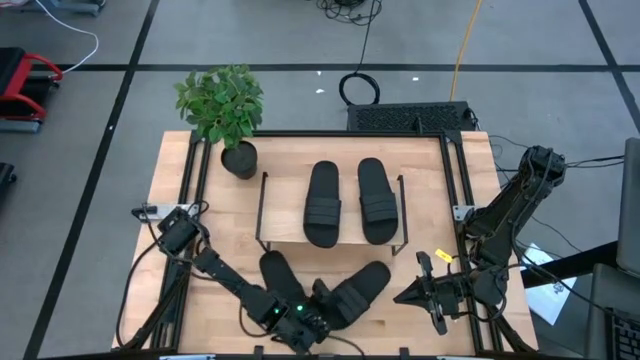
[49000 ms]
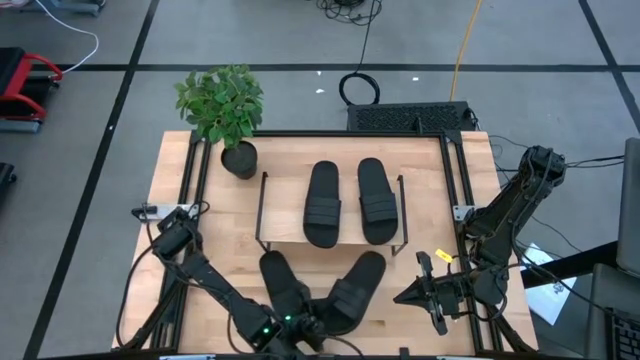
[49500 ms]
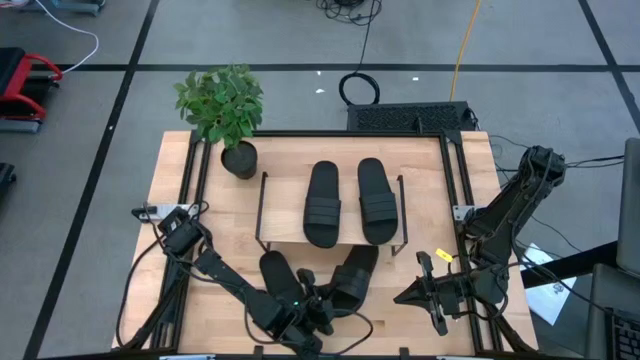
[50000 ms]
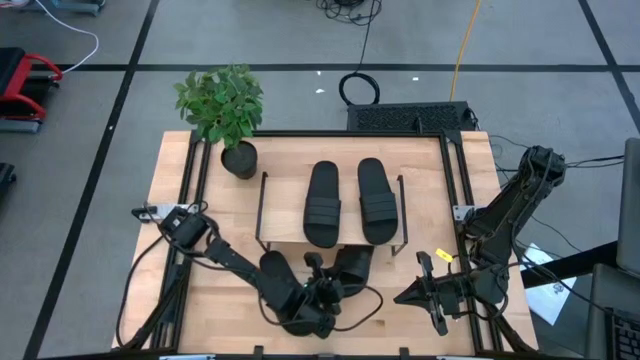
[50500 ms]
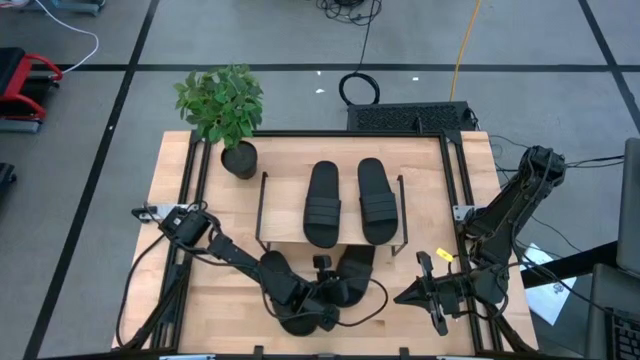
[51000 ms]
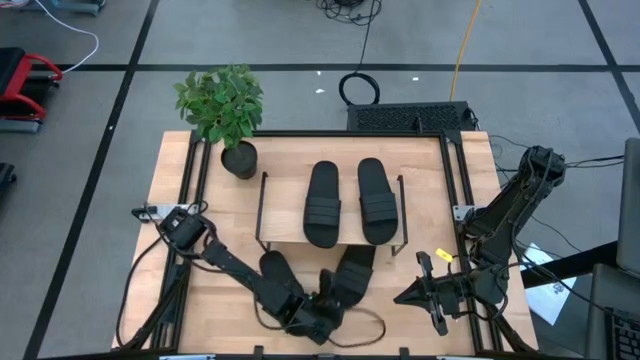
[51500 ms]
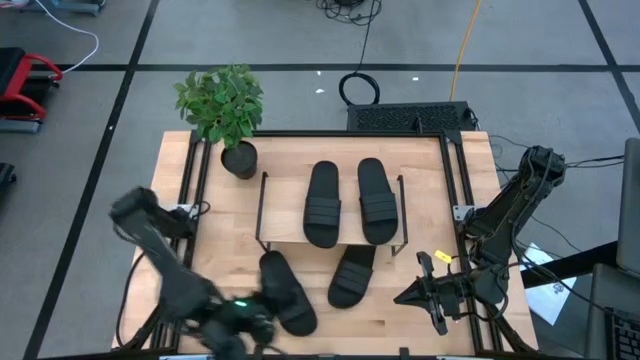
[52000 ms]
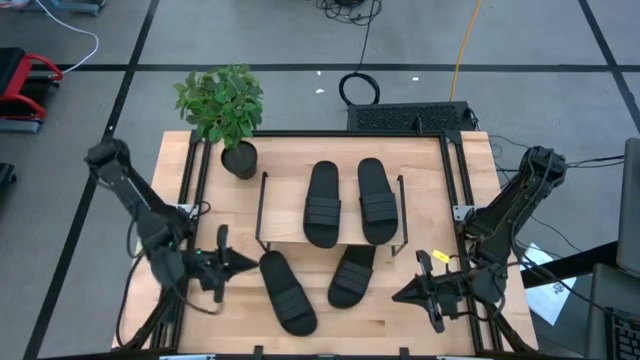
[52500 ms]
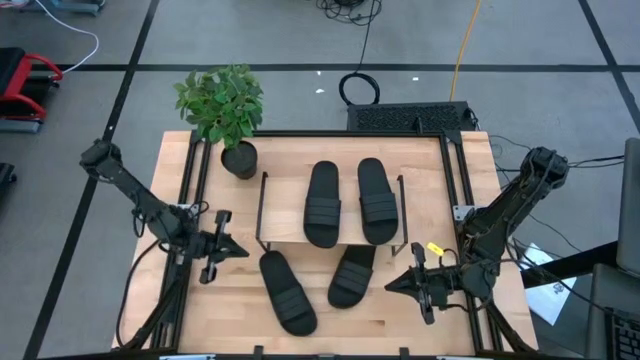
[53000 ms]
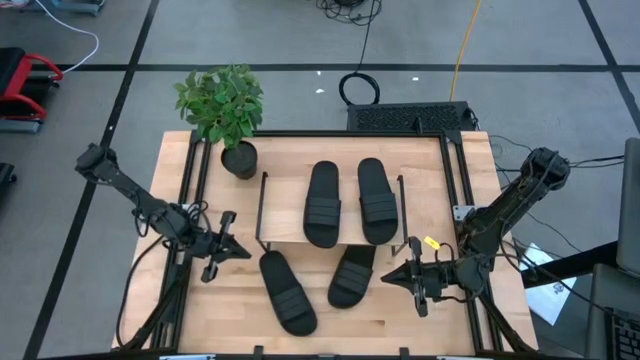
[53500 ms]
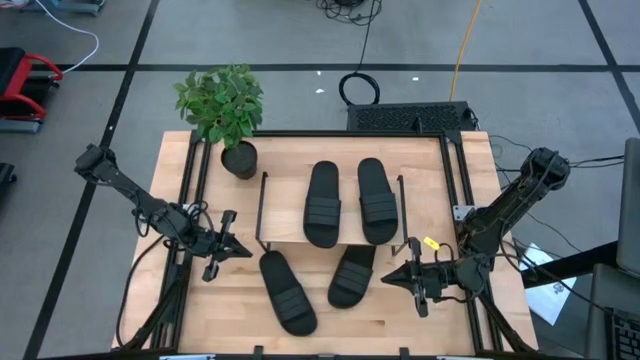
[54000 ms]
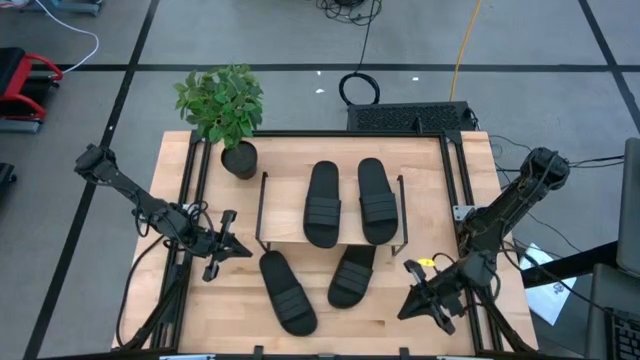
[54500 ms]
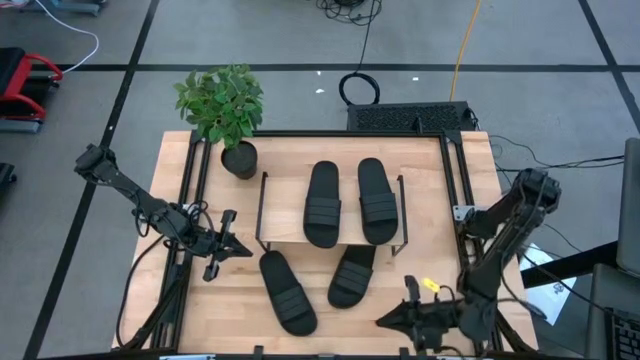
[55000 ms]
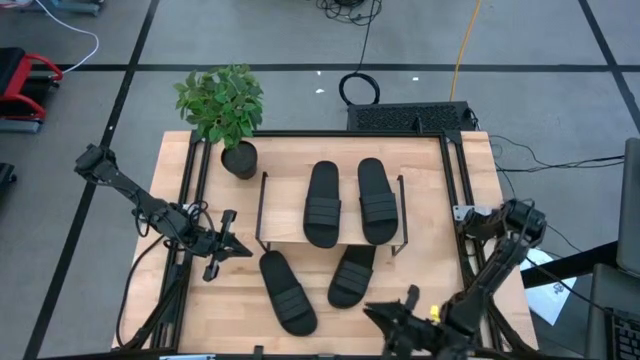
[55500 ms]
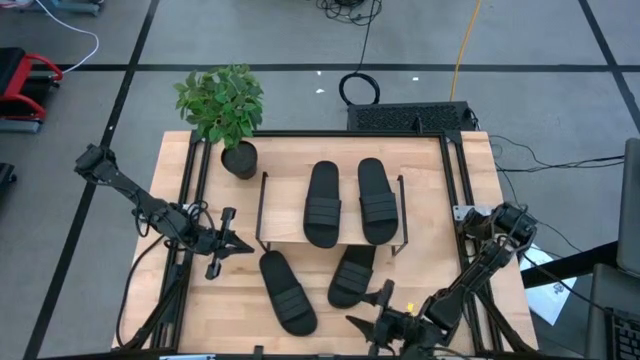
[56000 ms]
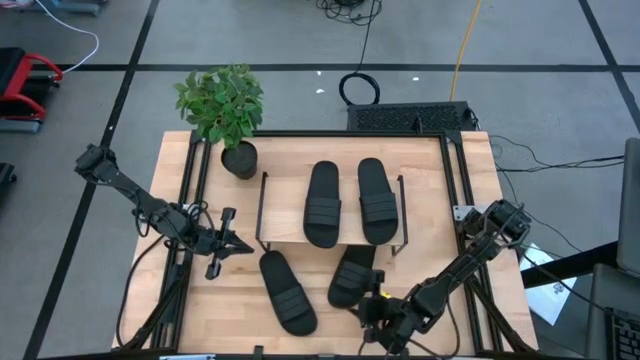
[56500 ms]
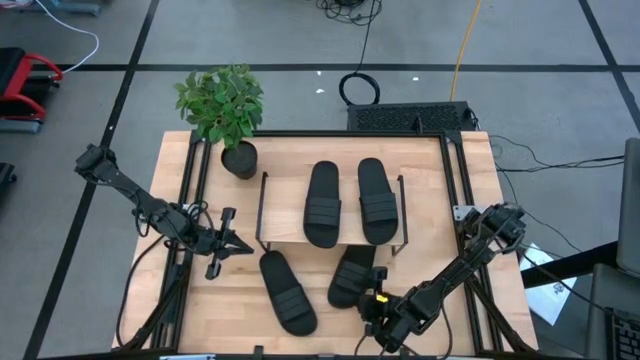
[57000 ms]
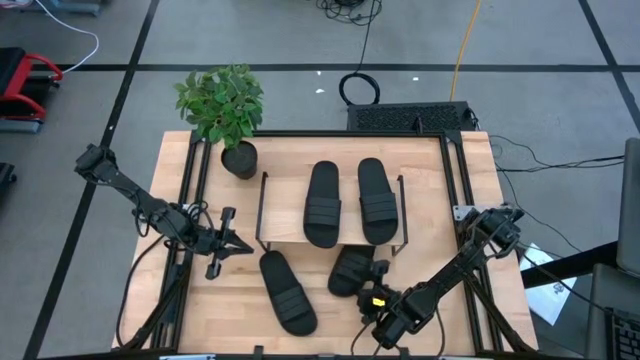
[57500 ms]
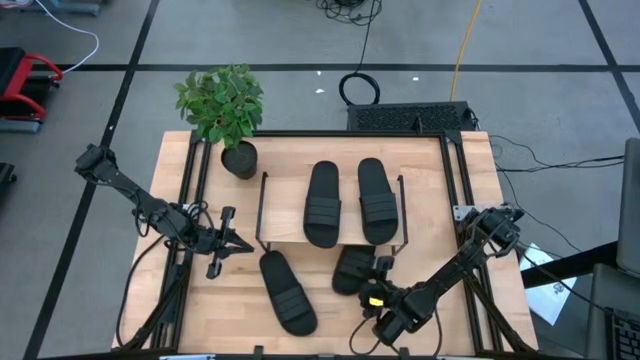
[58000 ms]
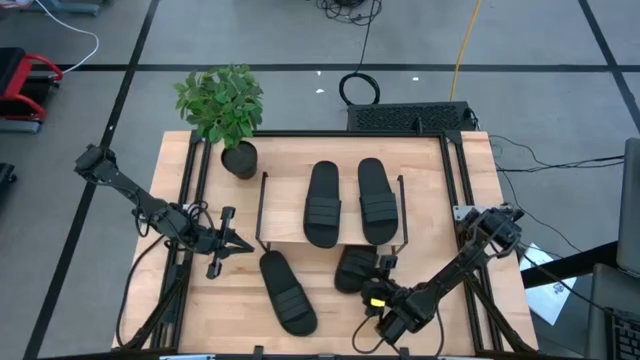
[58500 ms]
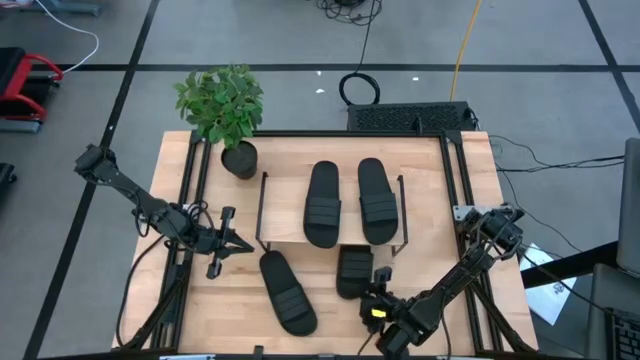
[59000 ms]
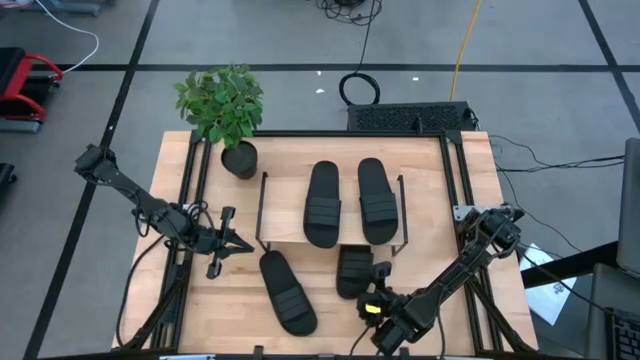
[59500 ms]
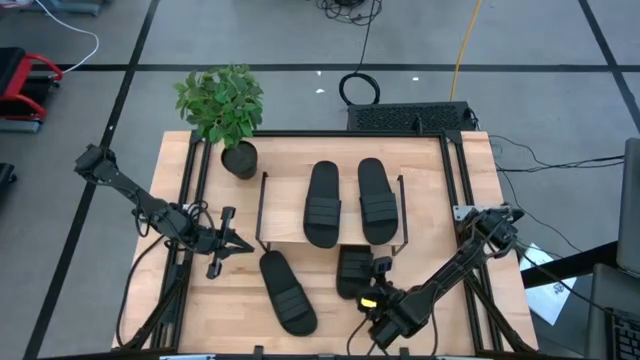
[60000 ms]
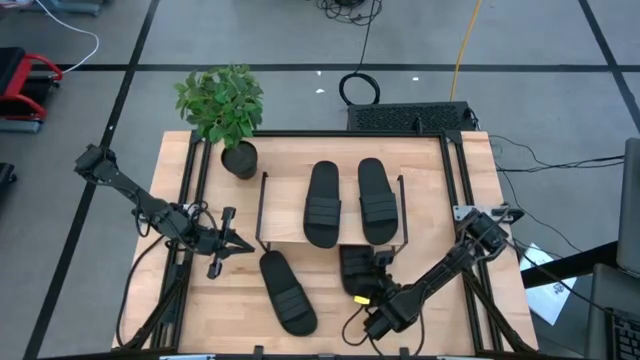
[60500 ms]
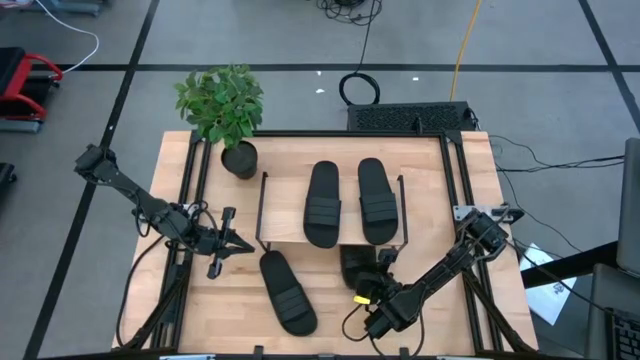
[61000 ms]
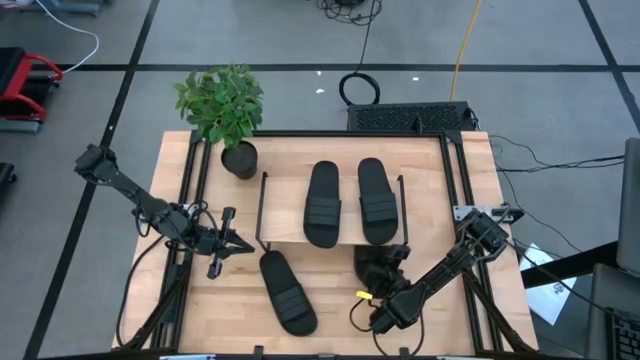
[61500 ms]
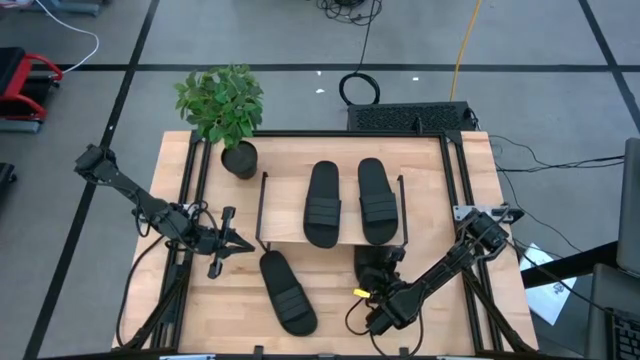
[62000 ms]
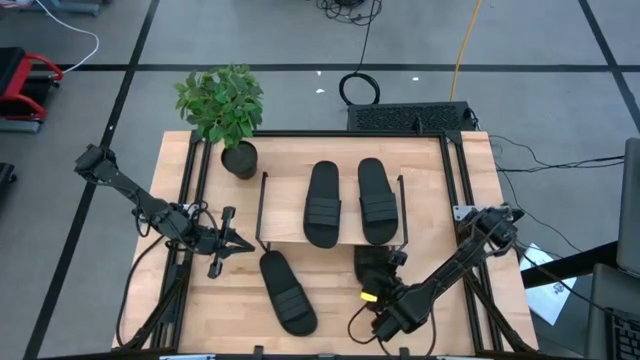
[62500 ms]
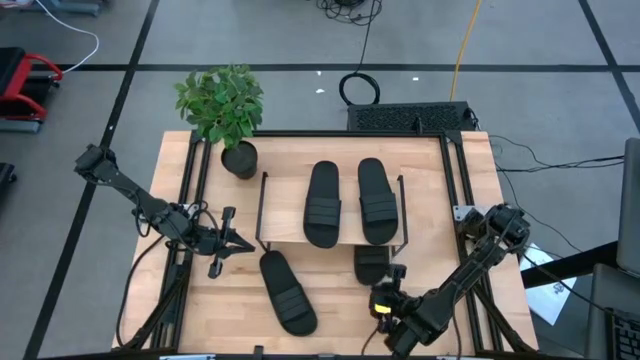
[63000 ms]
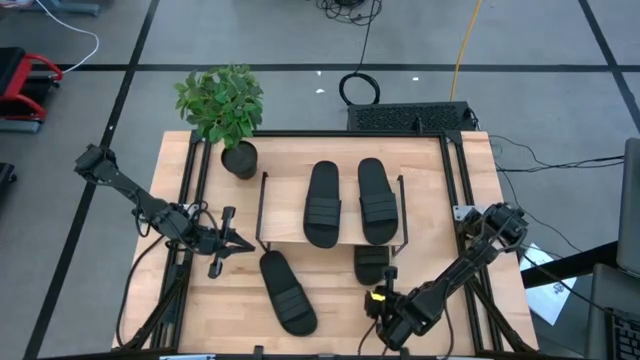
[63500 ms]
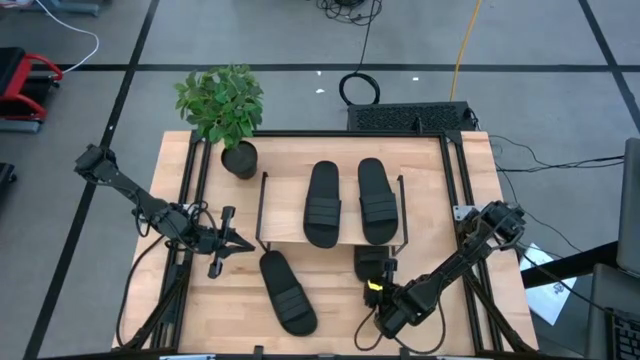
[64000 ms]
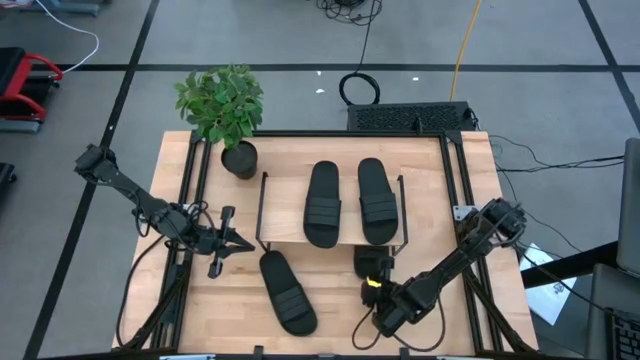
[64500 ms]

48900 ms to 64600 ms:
Task: Pick and place slides into the shelf
Put the right black slide under the shelf

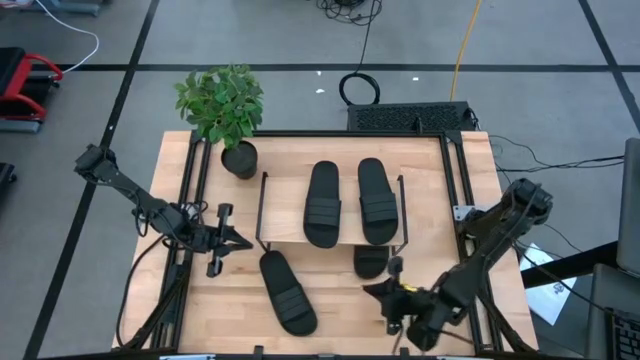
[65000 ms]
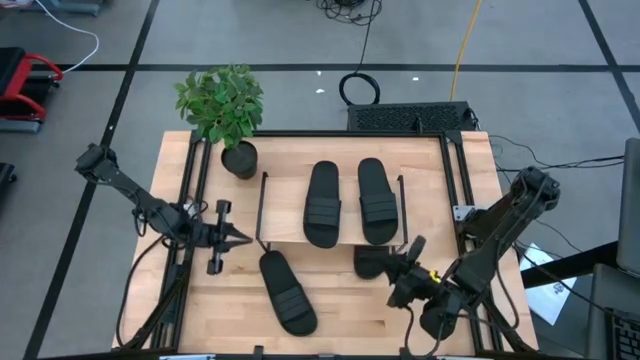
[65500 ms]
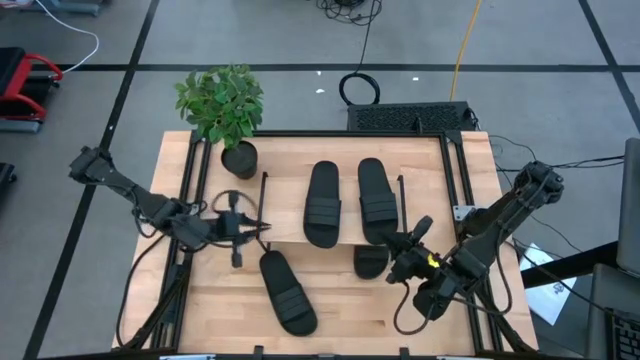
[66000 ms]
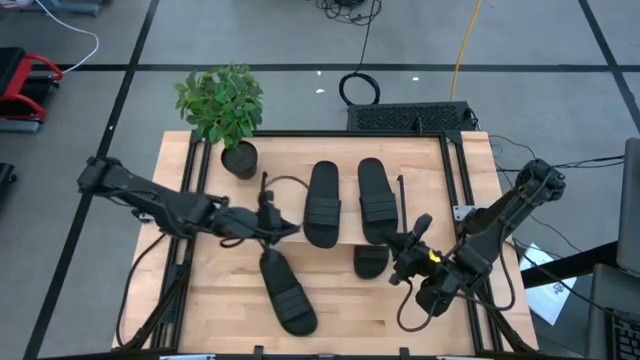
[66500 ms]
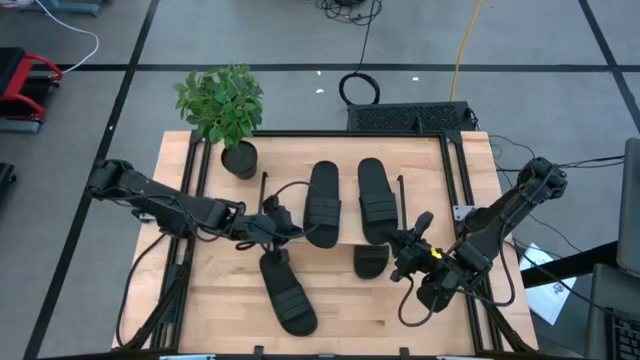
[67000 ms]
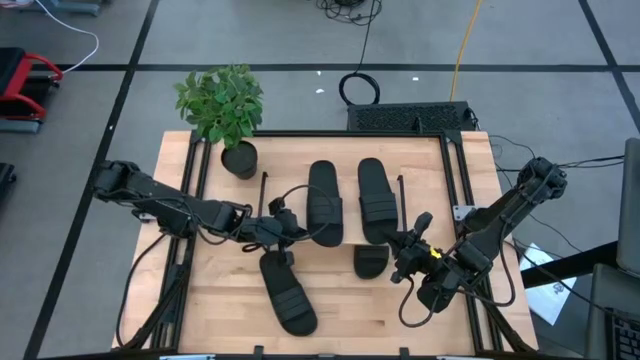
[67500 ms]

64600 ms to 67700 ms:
Adjust the left black slide on the shelf

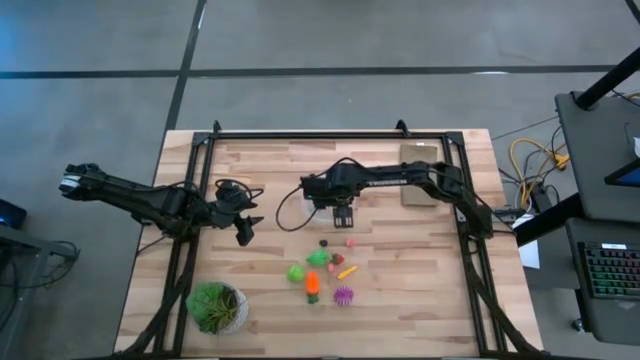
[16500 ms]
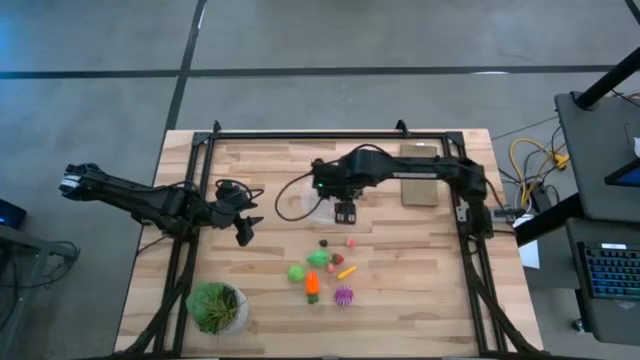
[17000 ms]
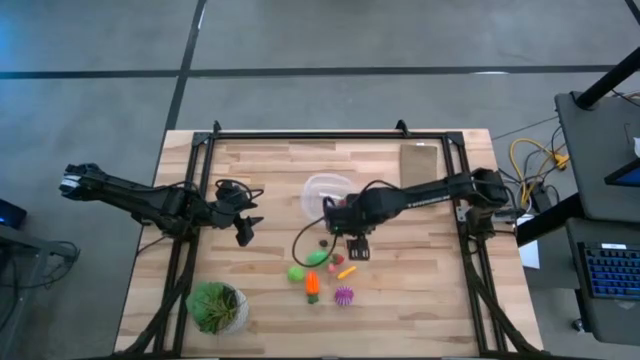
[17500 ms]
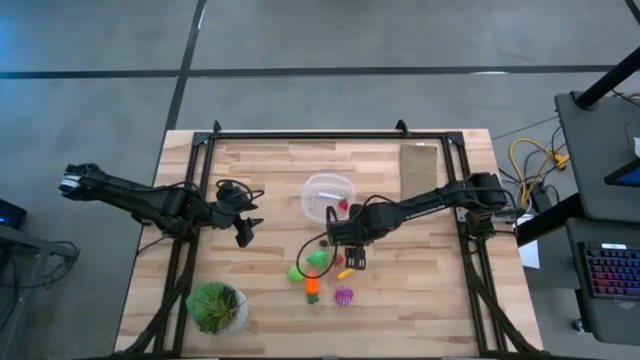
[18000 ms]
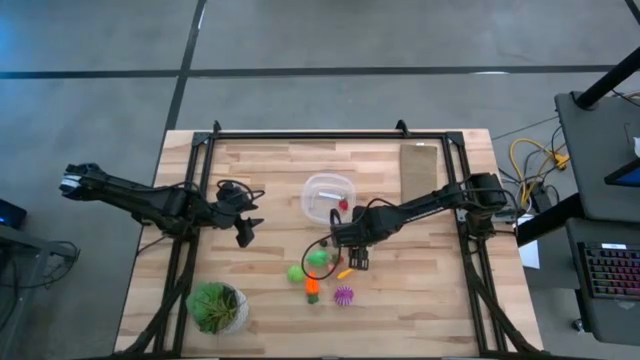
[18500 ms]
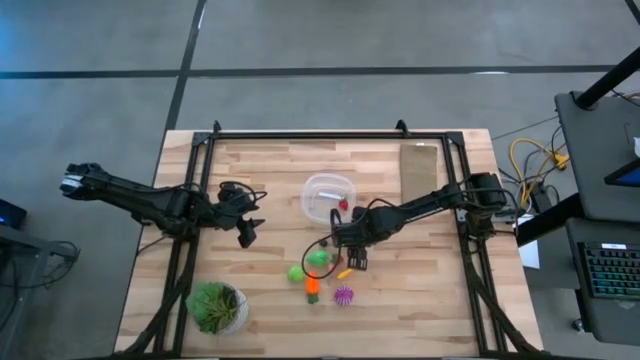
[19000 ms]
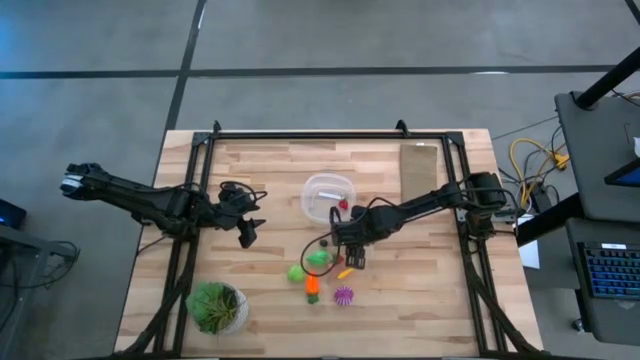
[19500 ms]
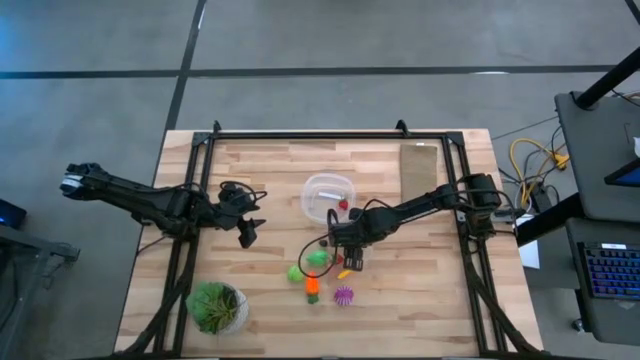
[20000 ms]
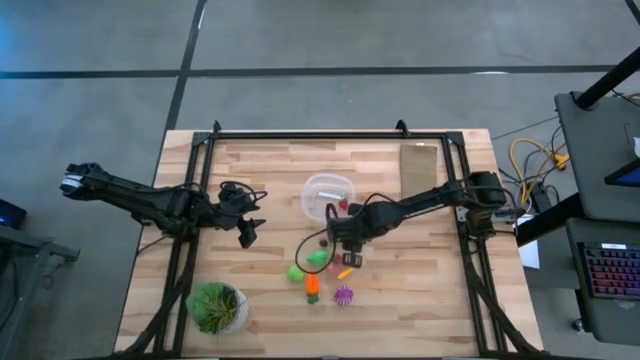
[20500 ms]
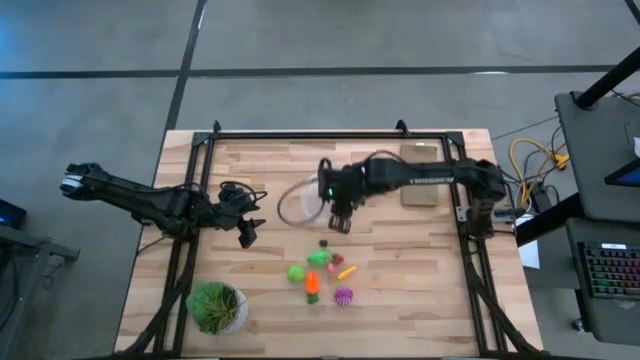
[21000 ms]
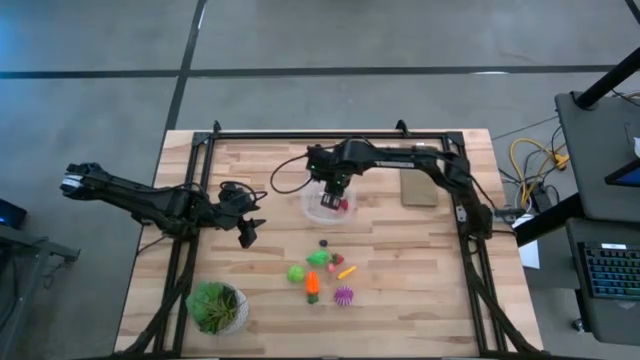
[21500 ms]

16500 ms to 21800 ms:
Task: Pick and placing Produce into tupperware
Put the top pink peach into the transparent container
